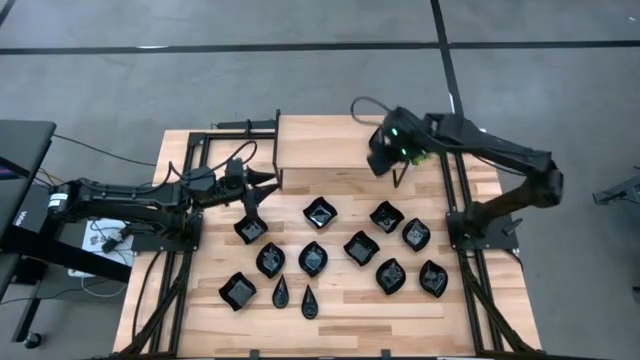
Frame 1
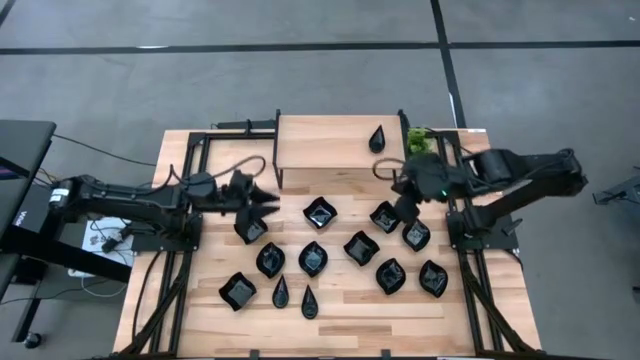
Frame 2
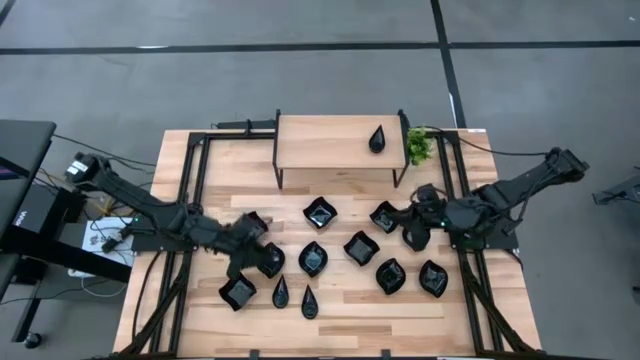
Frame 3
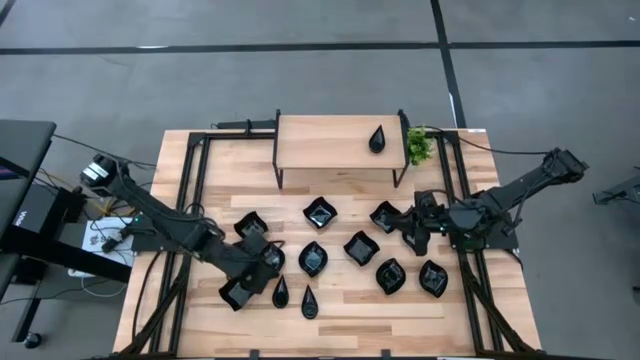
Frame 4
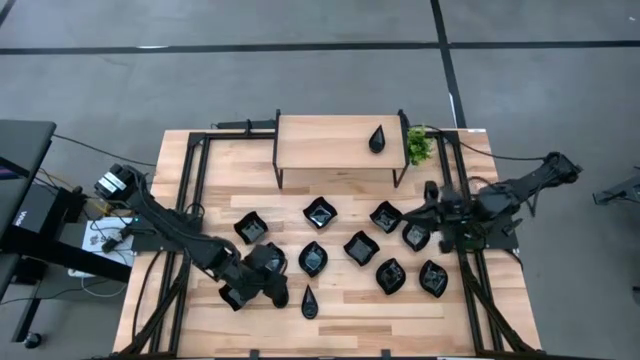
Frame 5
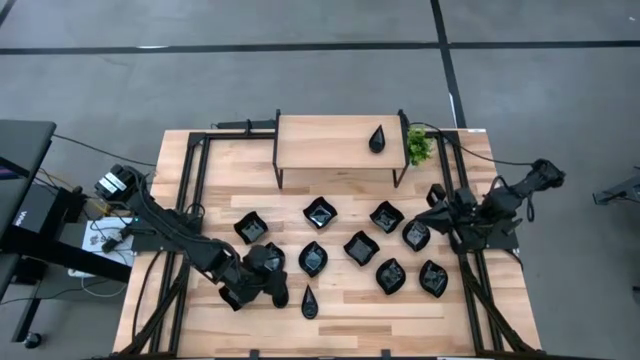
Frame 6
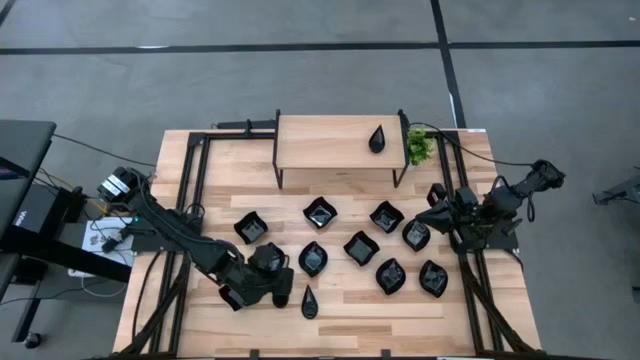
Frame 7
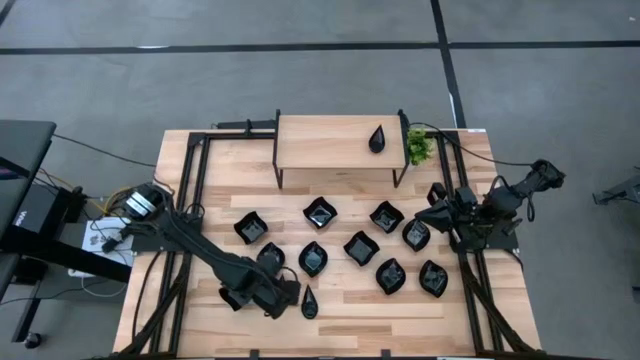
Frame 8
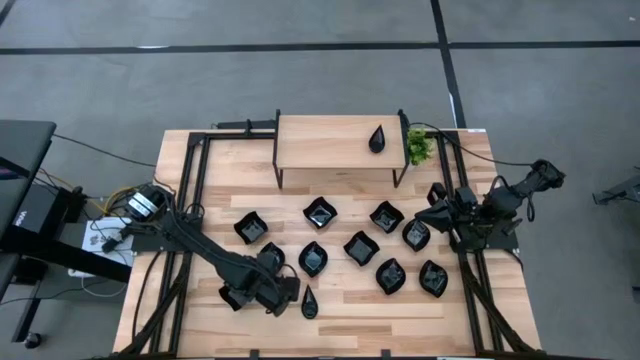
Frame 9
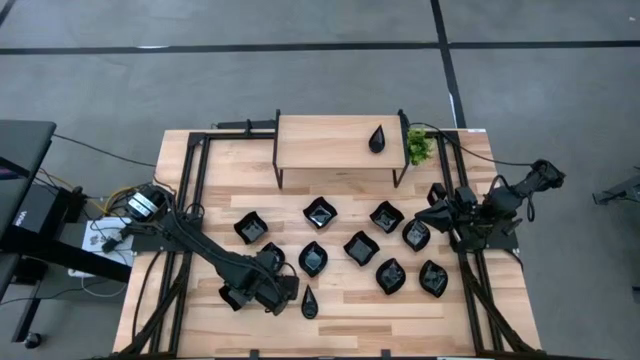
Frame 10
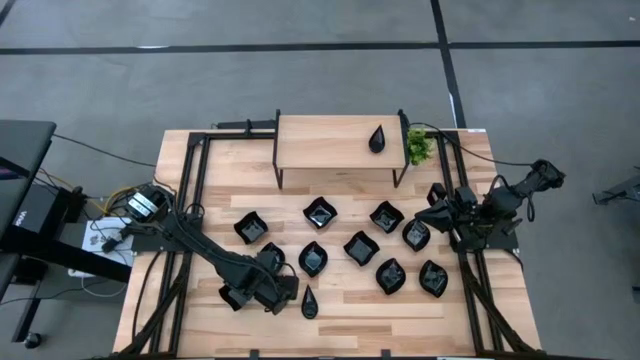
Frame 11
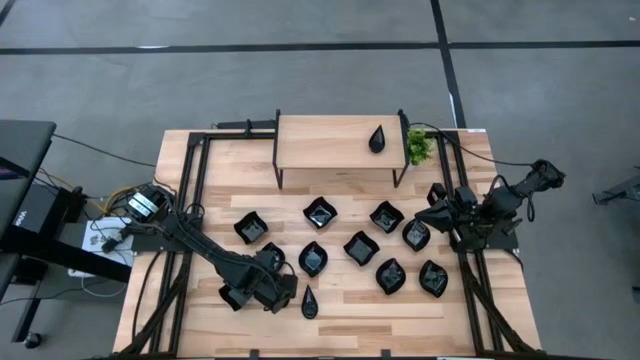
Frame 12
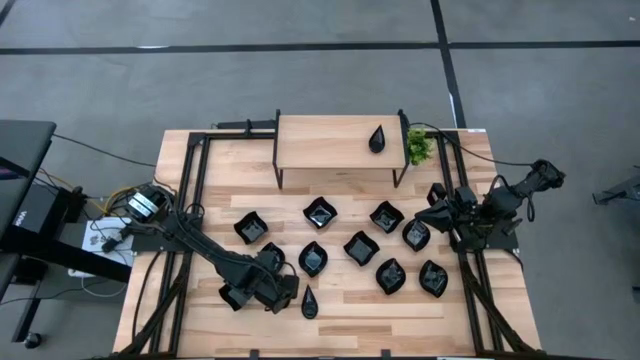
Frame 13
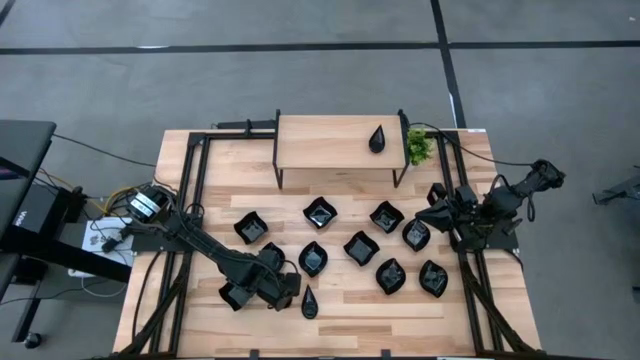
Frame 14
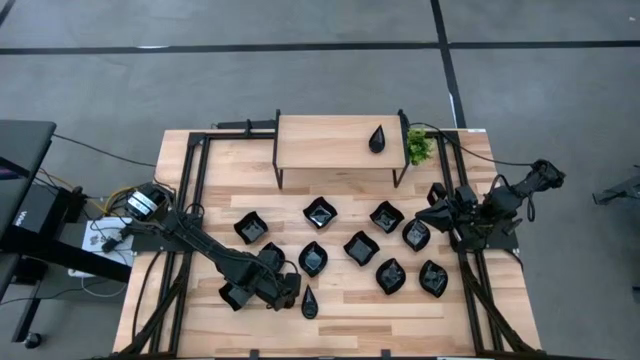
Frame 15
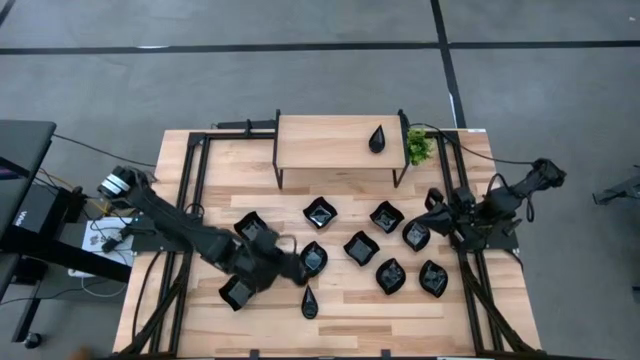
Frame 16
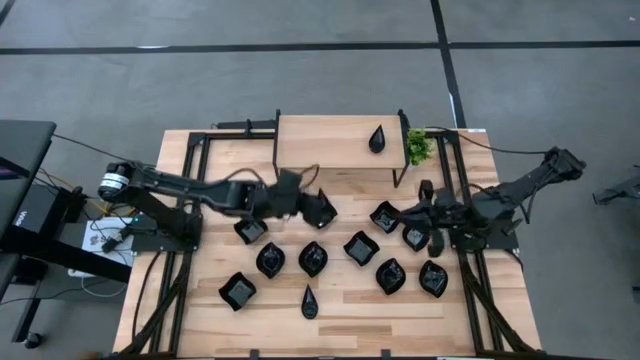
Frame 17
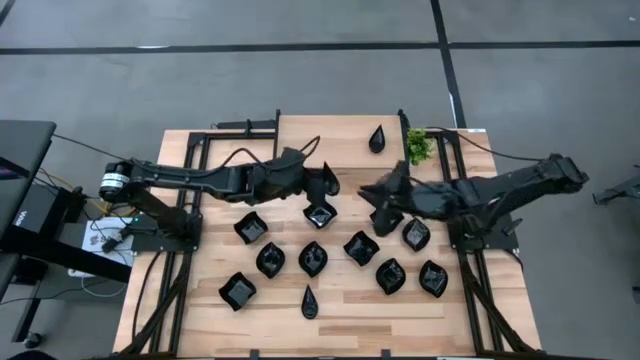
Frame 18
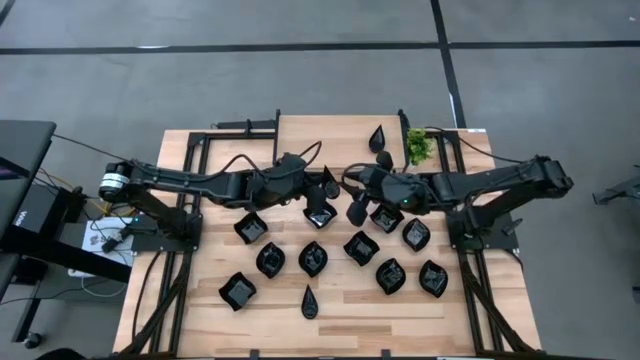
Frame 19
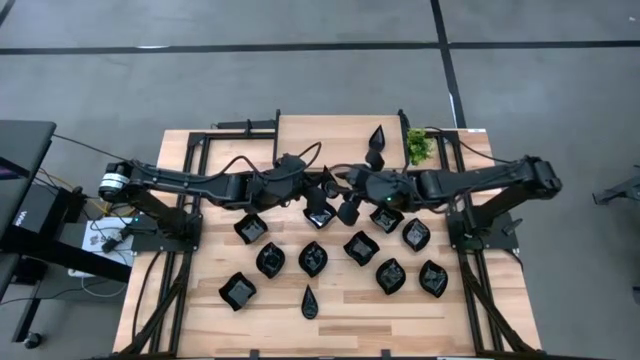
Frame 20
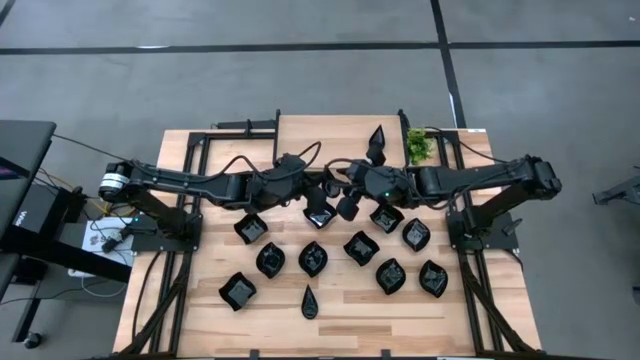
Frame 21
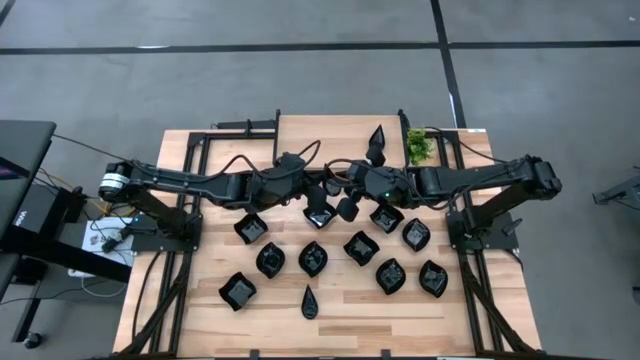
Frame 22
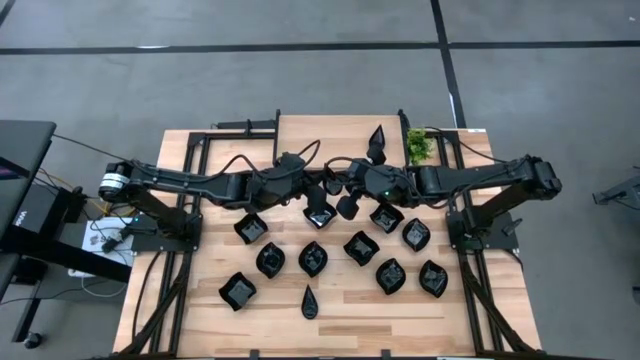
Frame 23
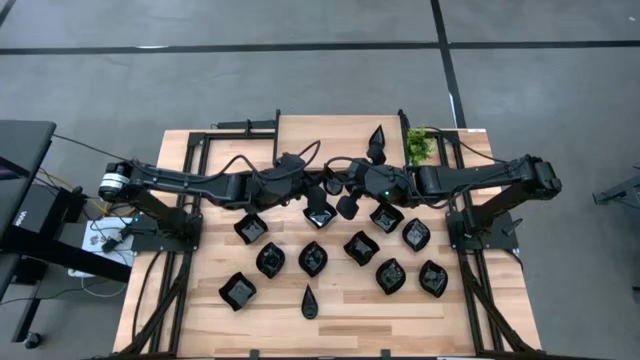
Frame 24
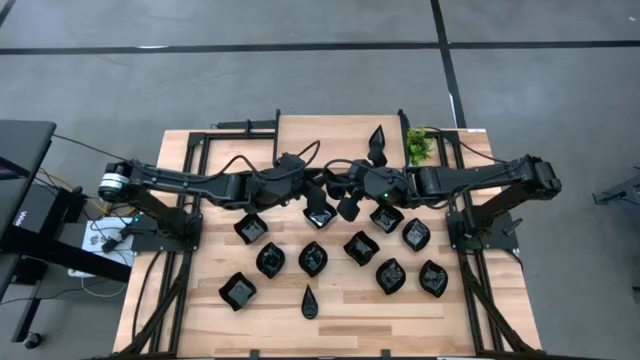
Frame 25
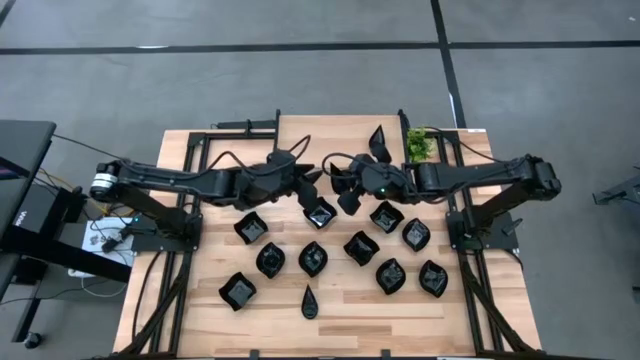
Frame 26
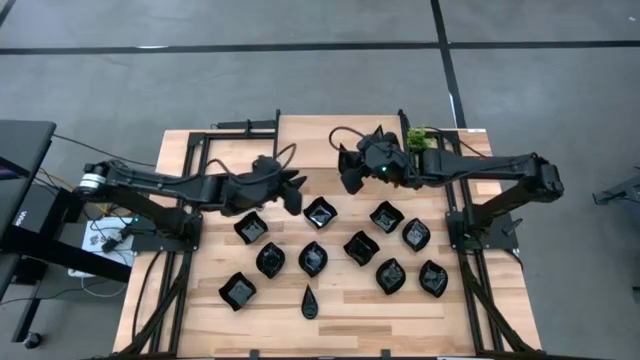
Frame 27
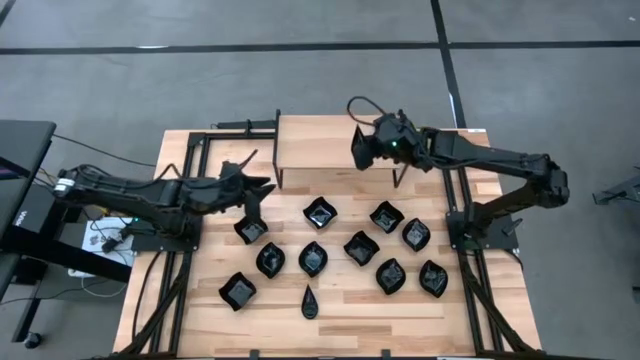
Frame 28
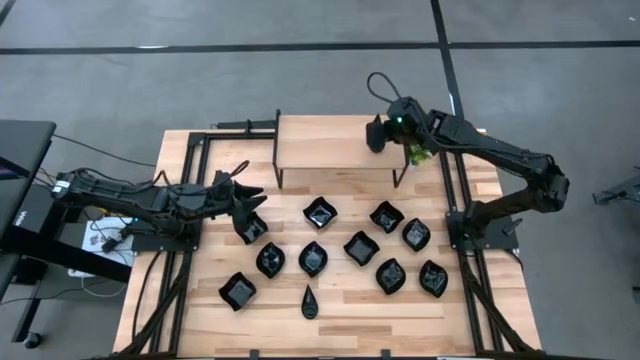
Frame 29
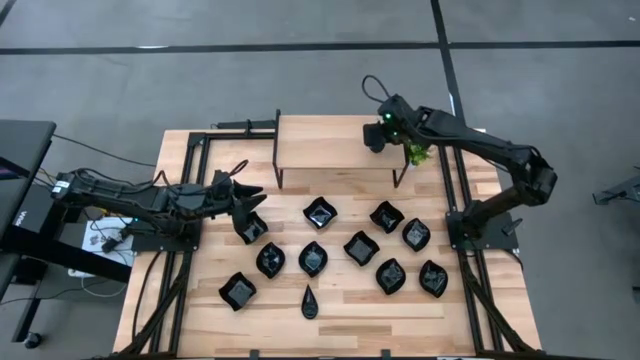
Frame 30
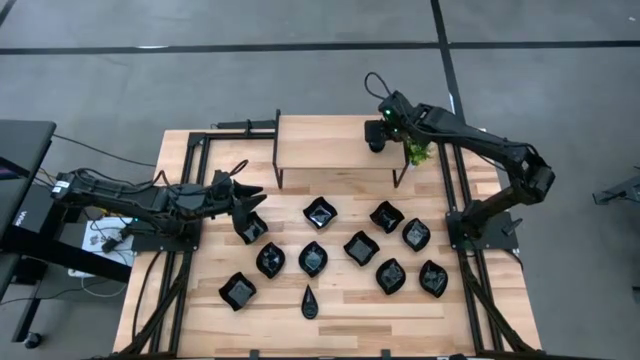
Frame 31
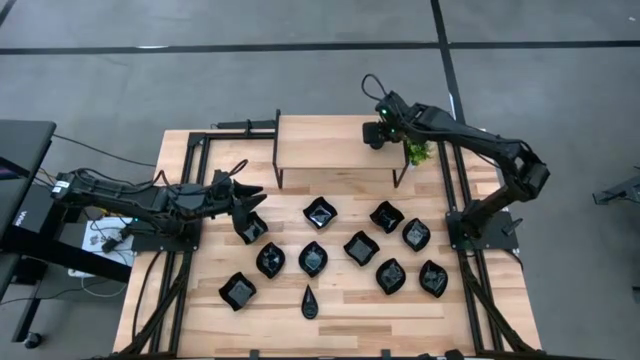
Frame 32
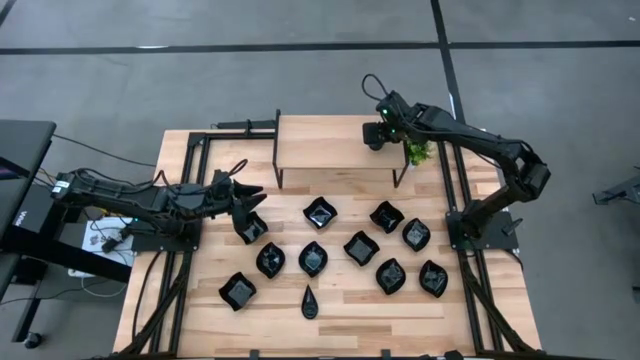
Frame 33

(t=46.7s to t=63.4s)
Task: Pick & Place Mini shaped plates
Stack the drop-shaped plate on top of the other drop-shaped plates on the shelf

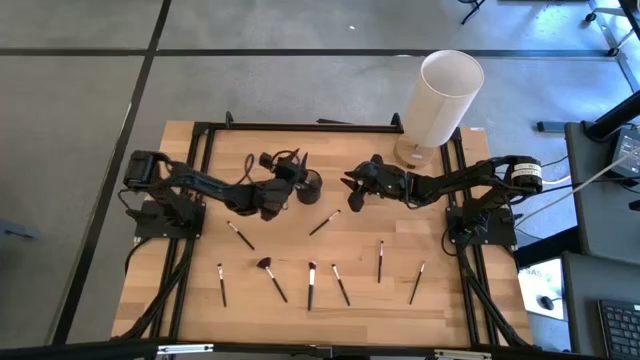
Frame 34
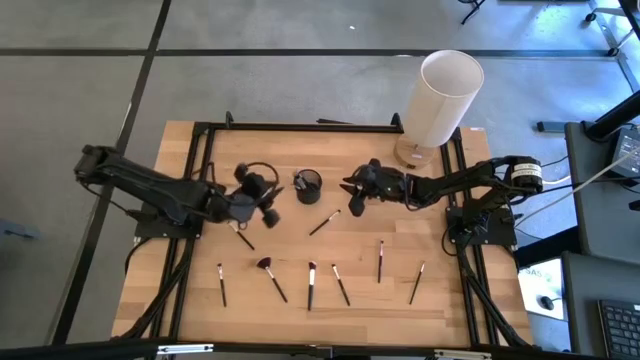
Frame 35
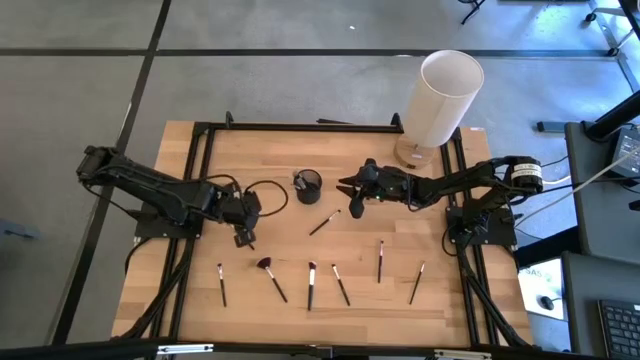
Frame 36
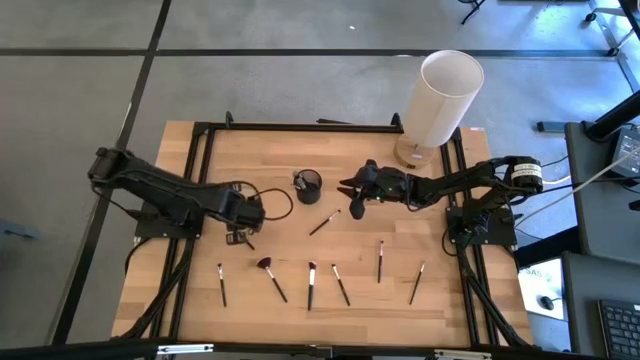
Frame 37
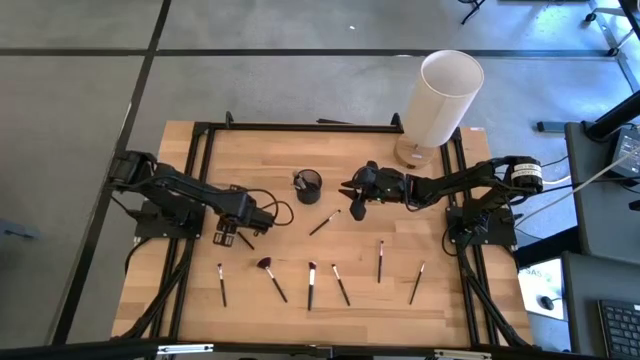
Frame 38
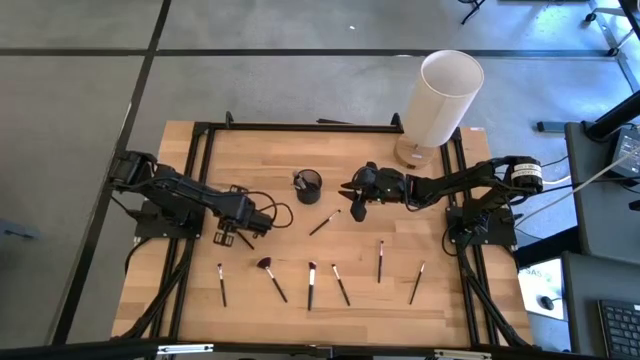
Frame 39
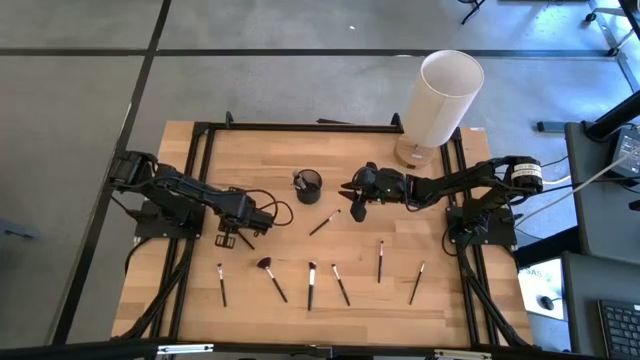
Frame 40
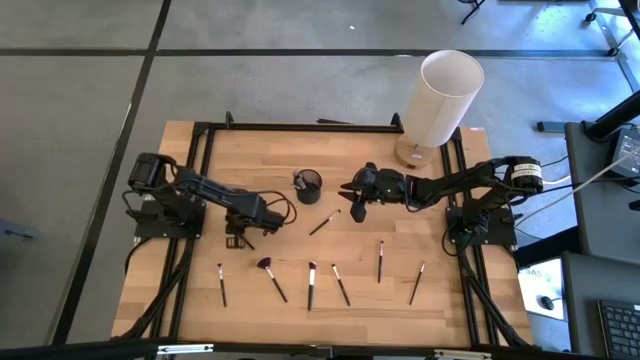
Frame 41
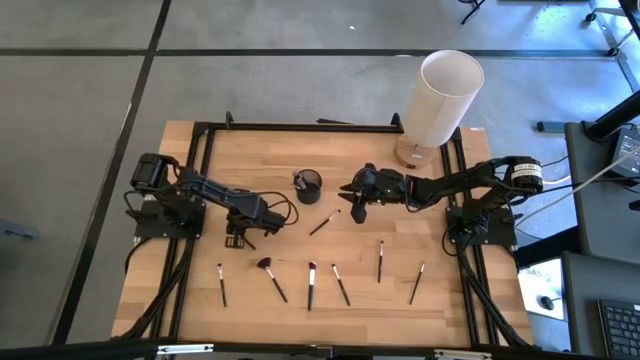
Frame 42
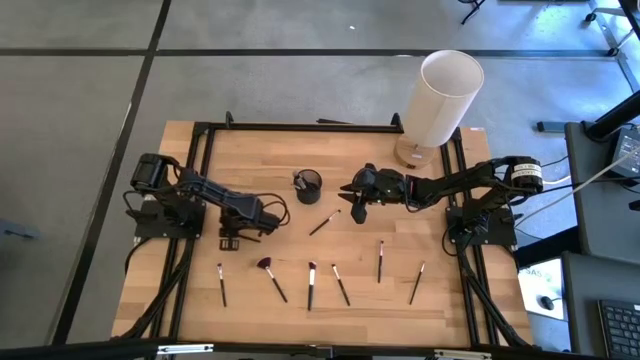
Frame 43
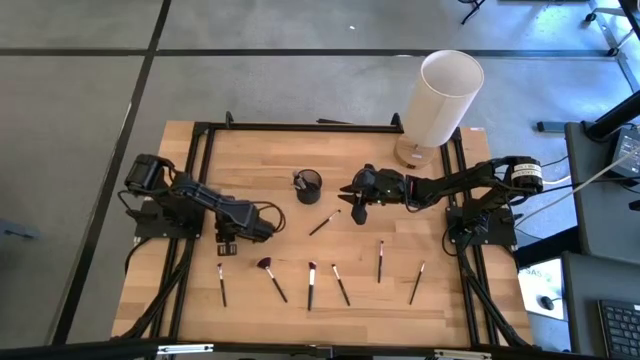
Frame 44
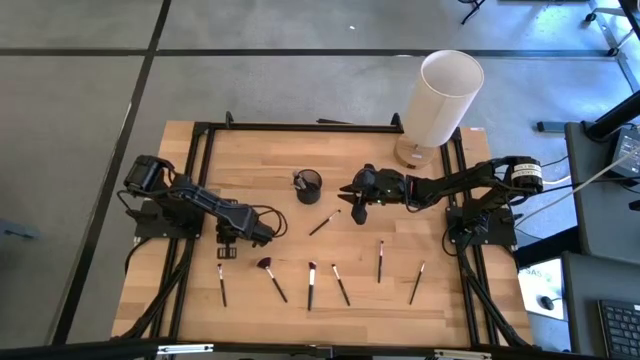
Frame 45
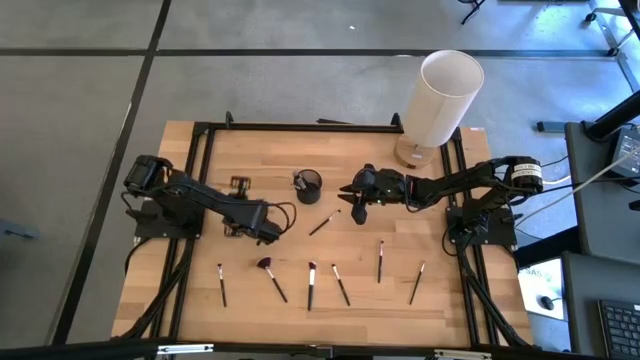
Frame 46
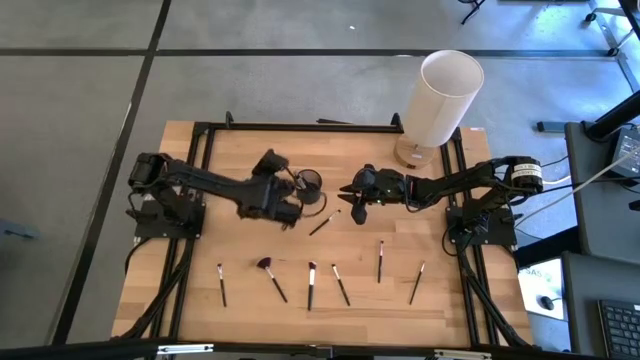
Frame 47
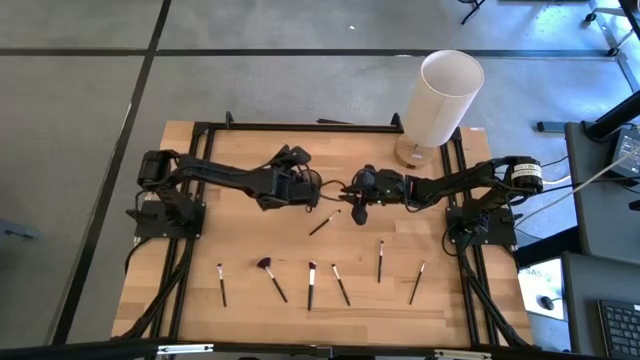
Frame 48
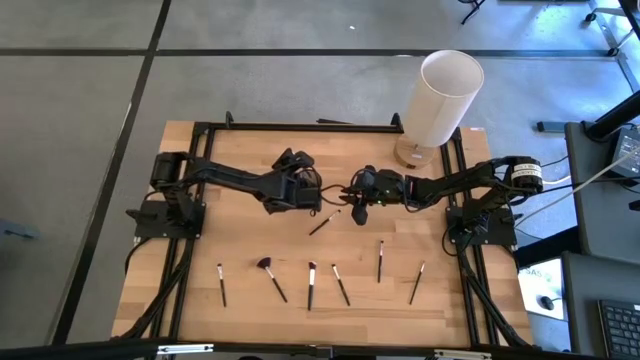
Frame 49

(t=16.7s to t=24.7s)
Task: Put items in baskets/containers
Put the black eyeshadow brush into the black pen holder
